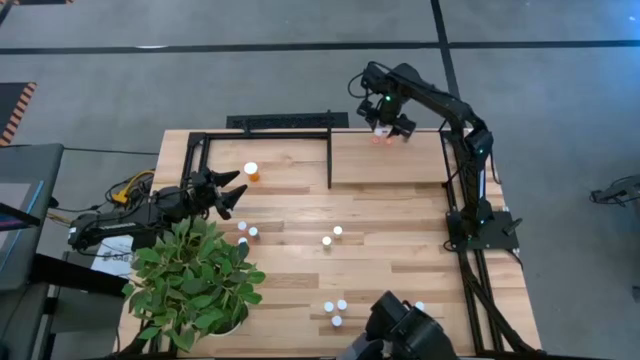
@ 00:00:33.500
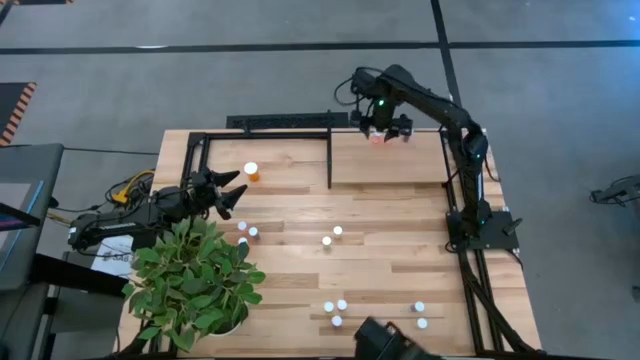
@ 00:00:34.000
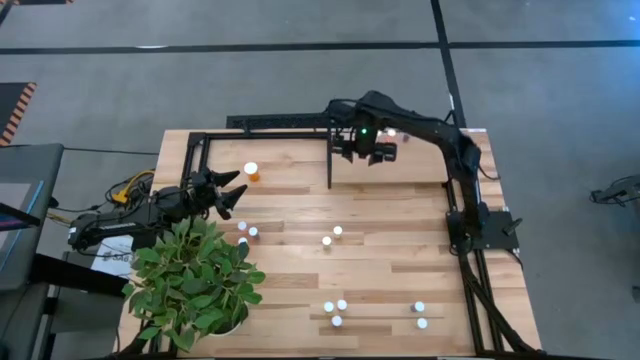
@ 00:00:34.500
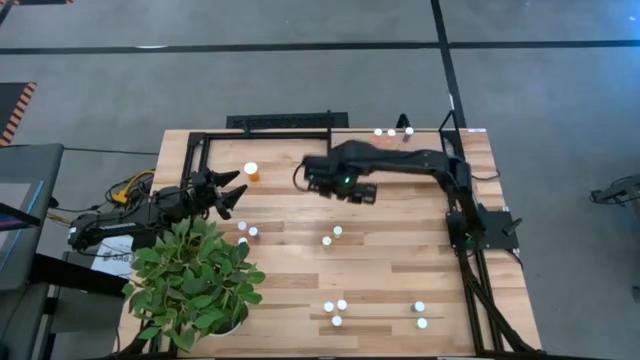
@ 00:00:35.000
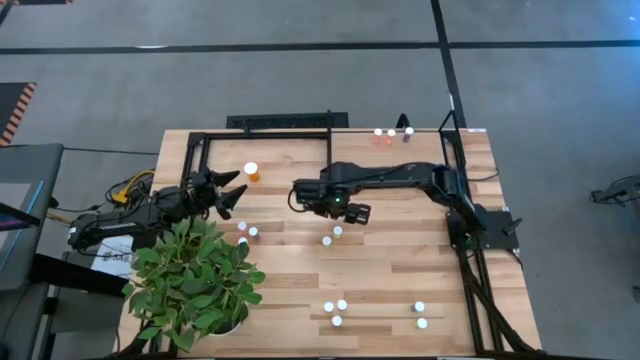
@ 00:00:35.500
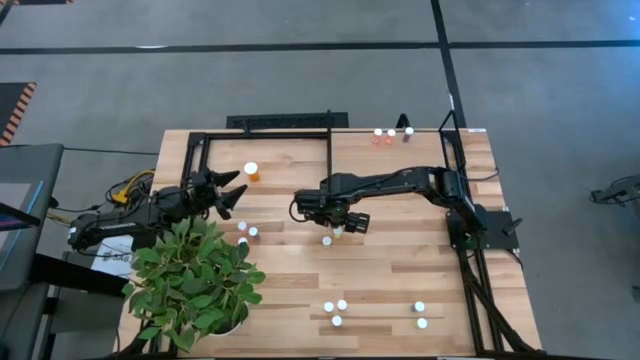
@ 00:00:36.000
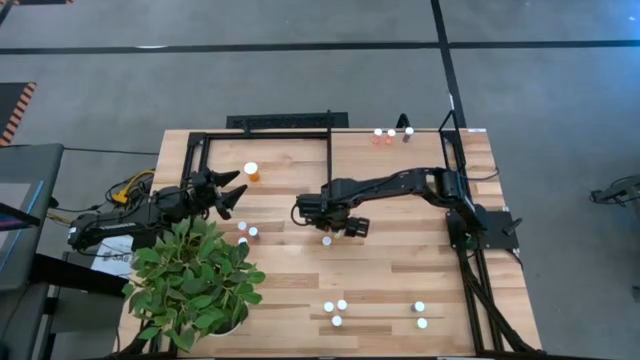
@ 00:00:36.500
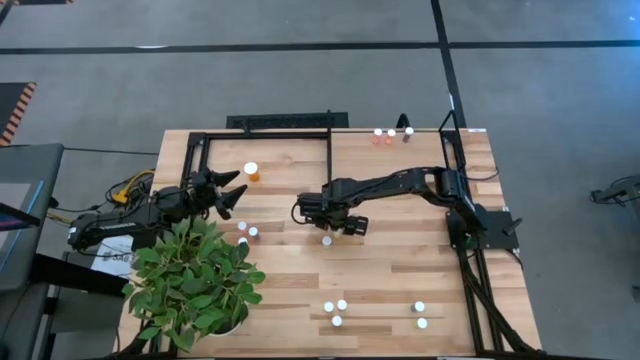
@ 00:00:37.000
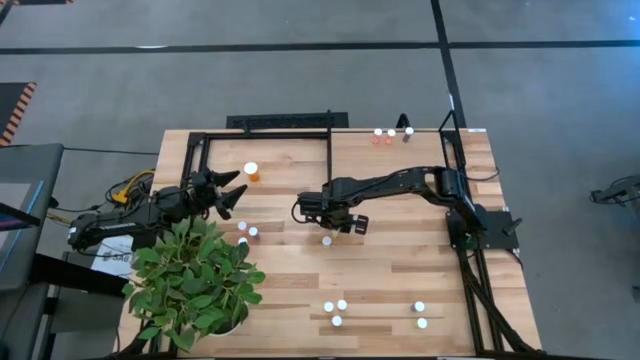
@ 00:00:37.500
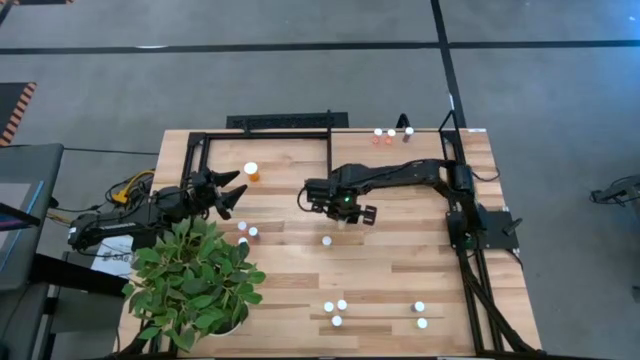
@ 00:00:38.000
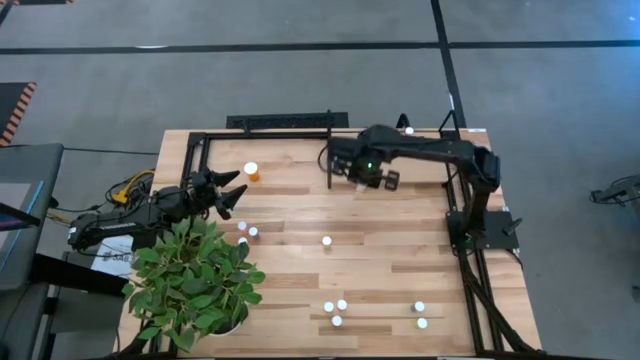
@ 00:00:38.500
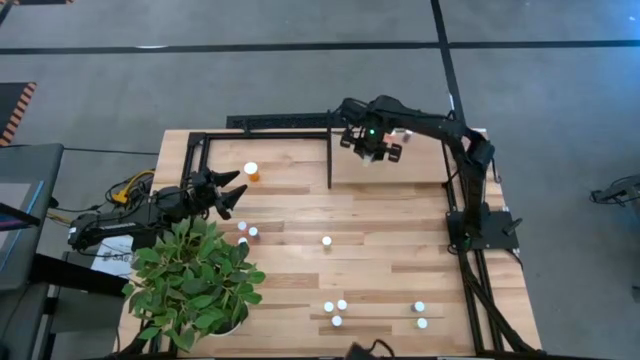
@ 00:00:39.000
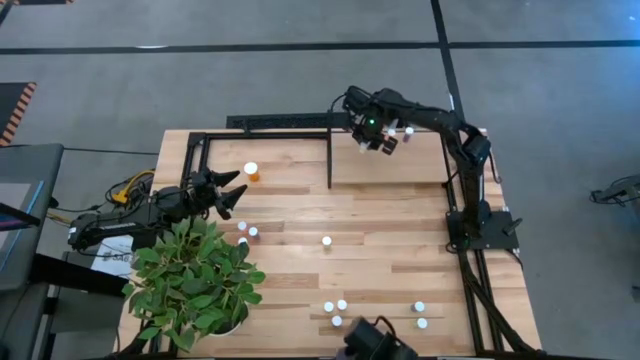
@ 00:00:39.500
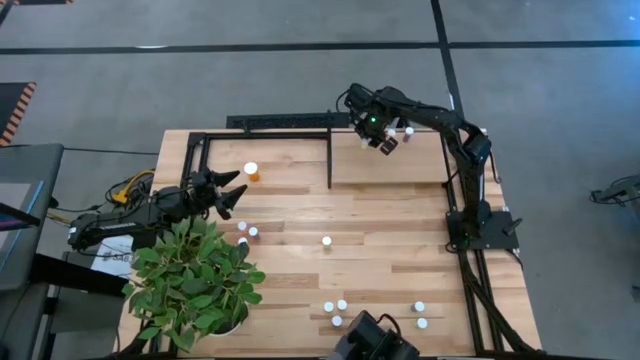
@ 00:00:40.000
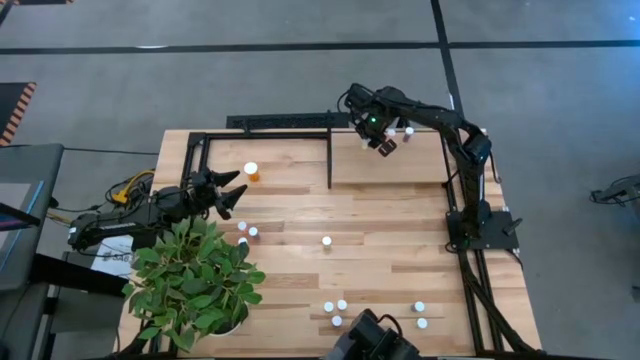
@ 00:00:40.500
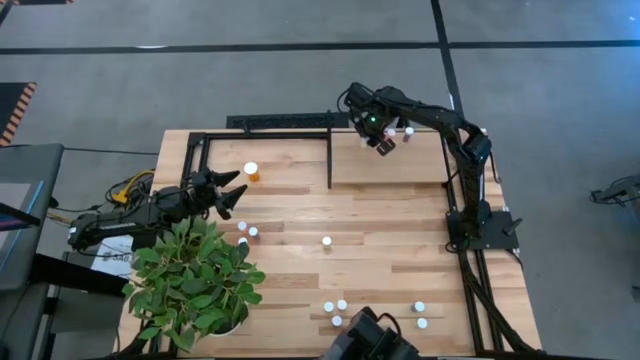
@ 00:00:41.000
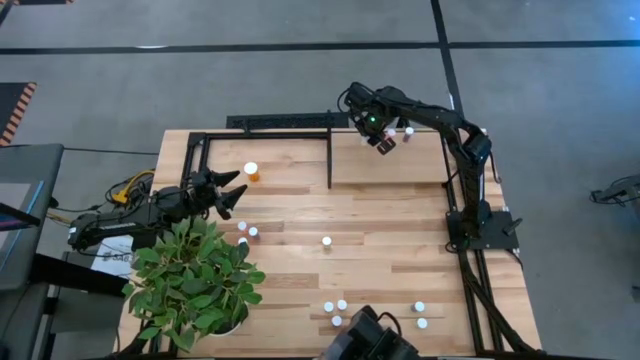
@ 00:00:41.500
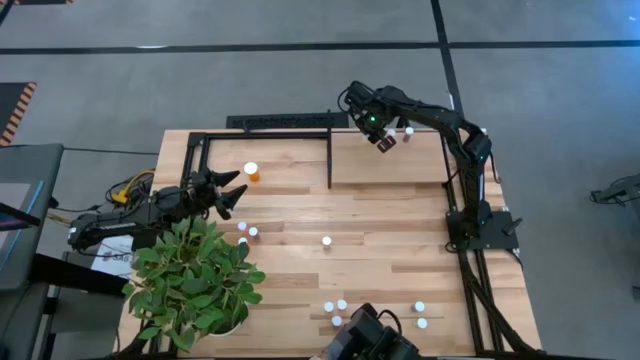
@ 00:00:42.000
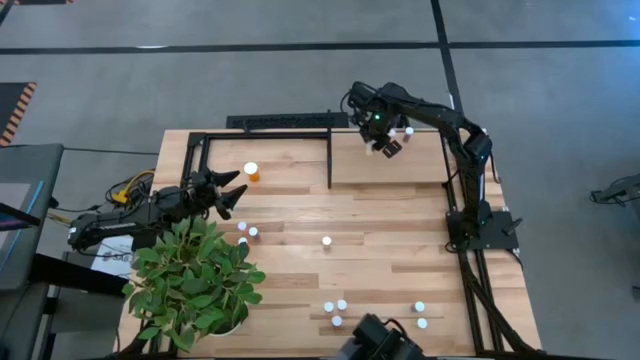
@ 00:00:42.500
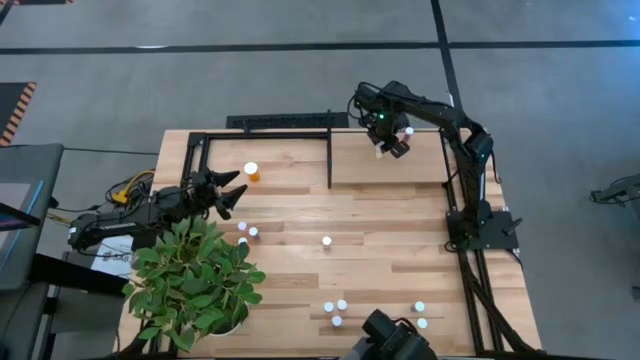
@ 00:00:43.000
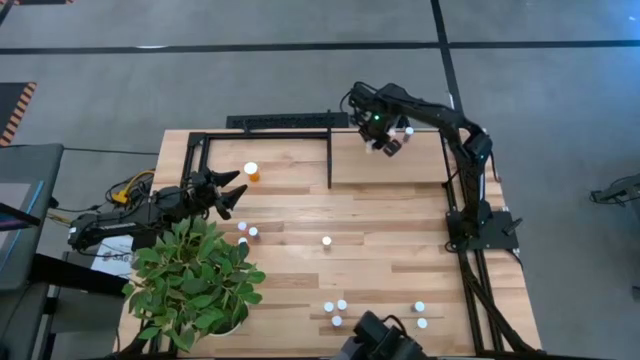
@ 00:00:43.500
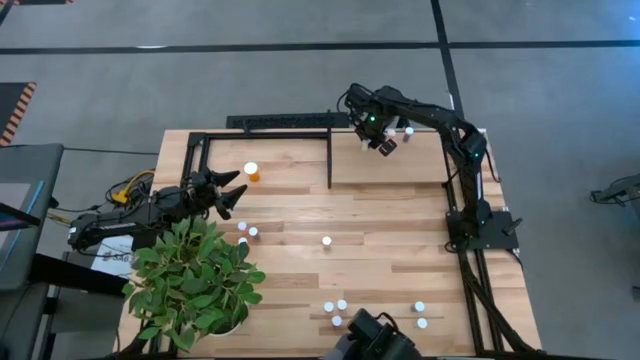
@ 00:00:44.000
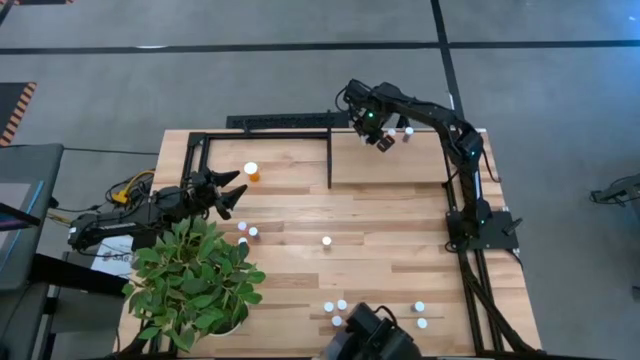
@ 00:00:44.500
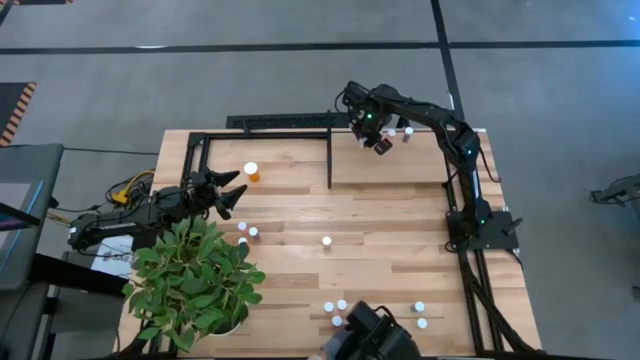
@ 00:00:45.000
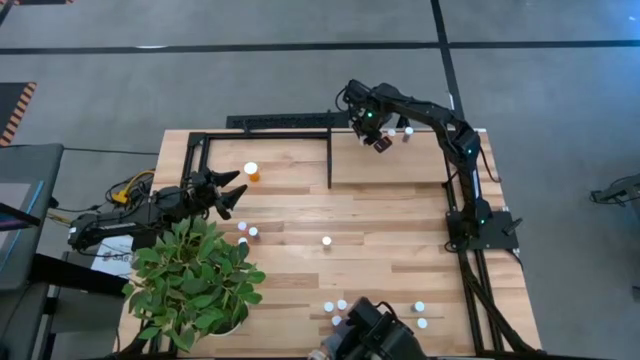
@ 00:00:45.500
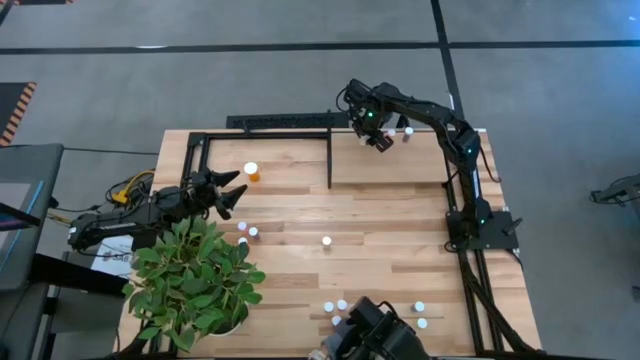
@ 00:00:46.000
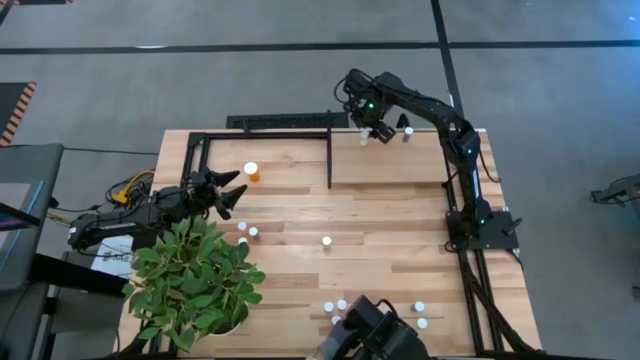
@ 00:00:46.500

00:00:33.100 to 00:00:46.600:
Task: Pick and place medicine bottles onto shelf by color
Put the yellow pill bottle on the shelf

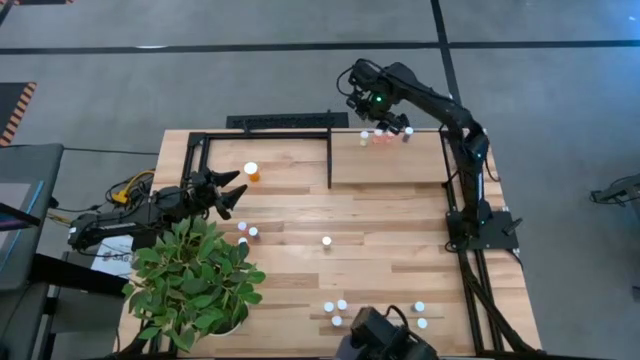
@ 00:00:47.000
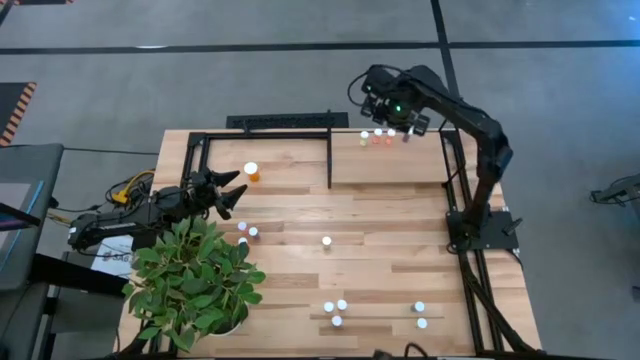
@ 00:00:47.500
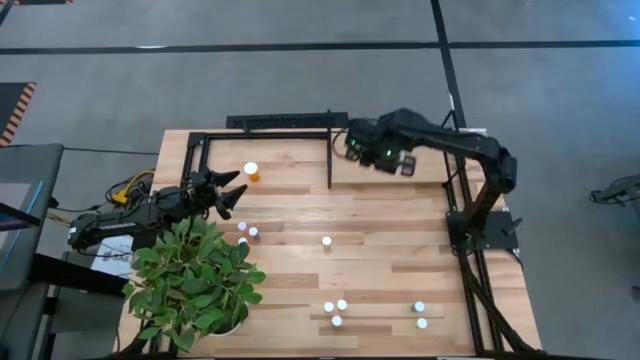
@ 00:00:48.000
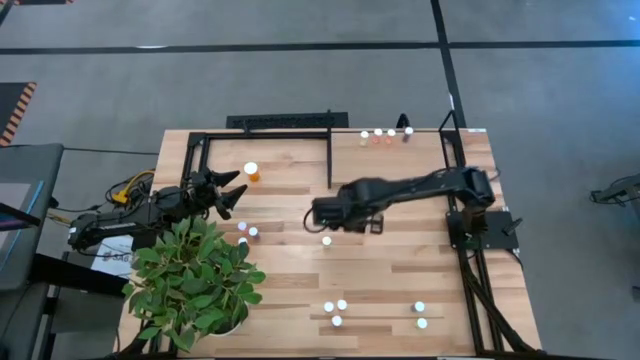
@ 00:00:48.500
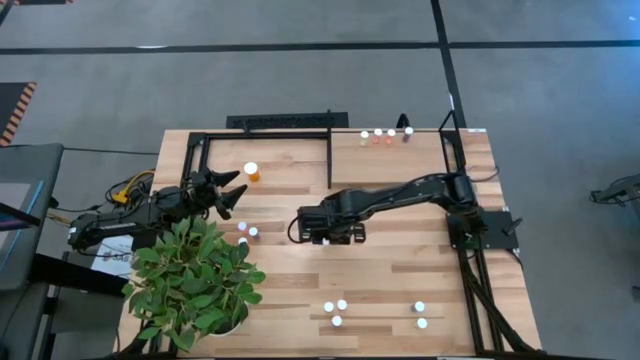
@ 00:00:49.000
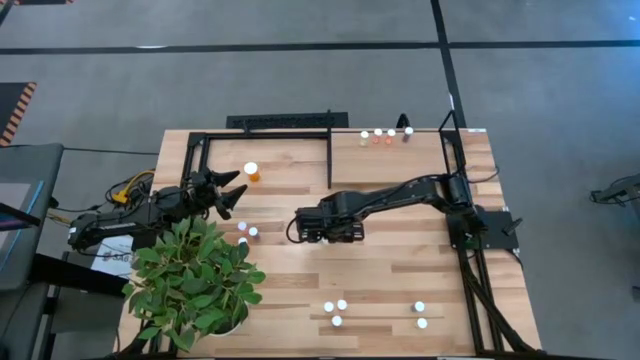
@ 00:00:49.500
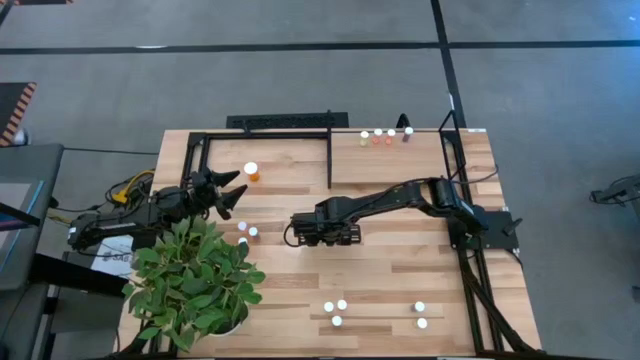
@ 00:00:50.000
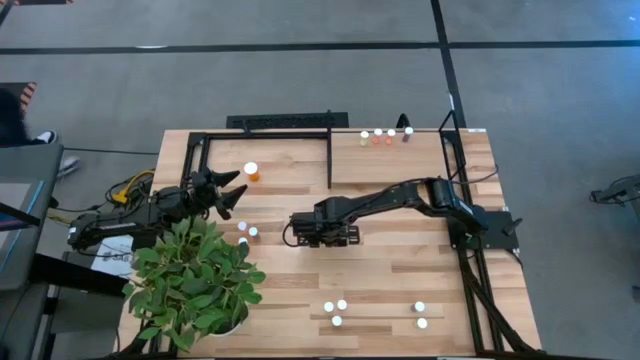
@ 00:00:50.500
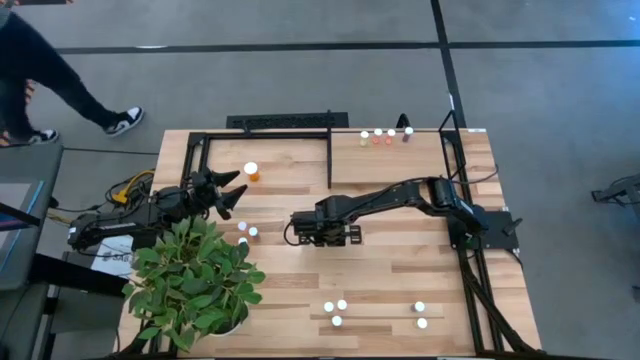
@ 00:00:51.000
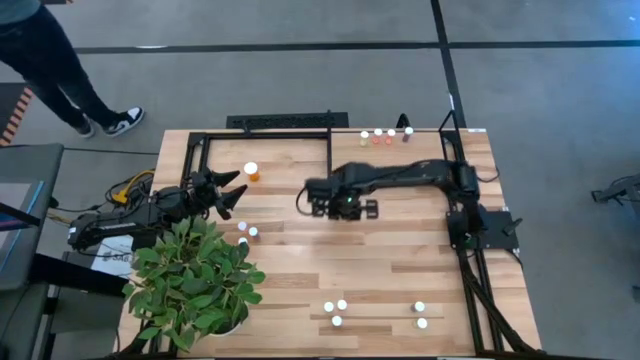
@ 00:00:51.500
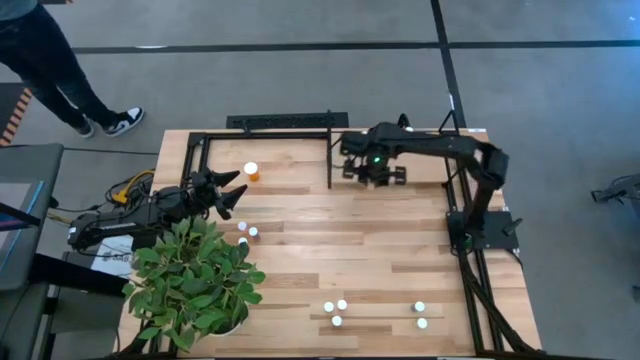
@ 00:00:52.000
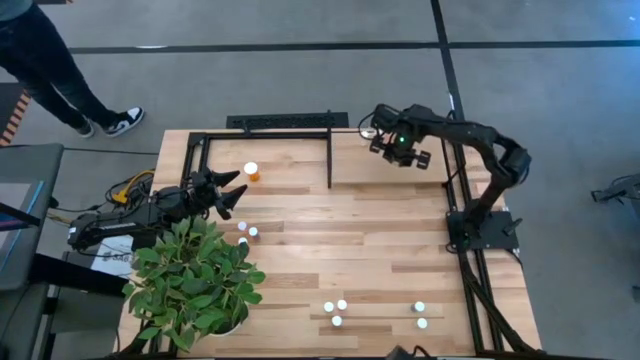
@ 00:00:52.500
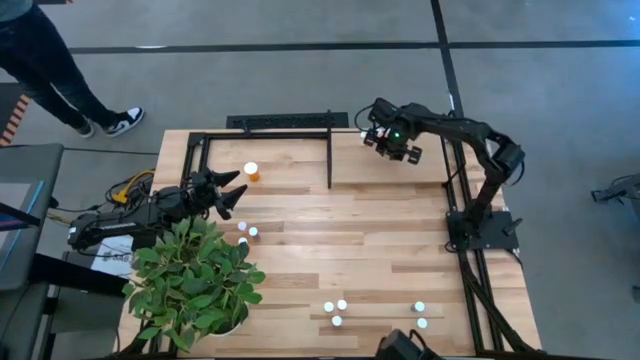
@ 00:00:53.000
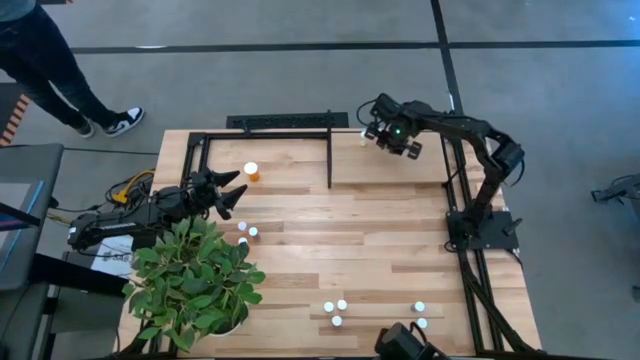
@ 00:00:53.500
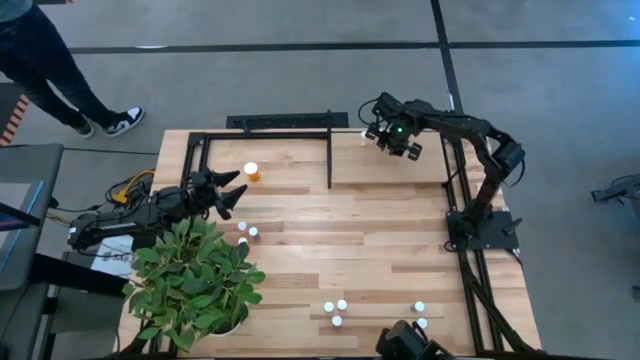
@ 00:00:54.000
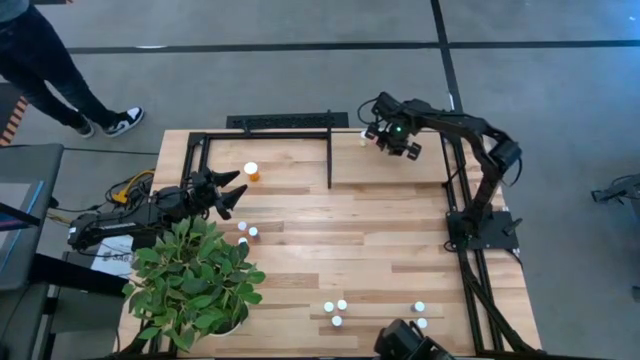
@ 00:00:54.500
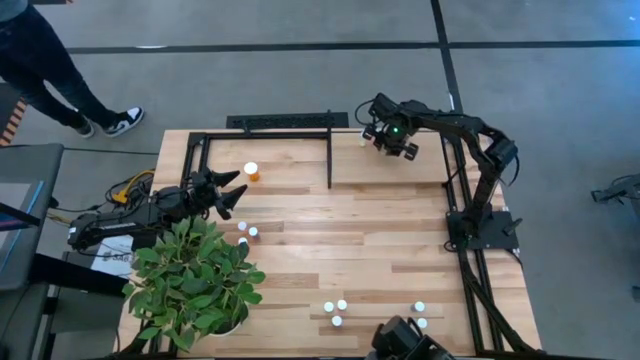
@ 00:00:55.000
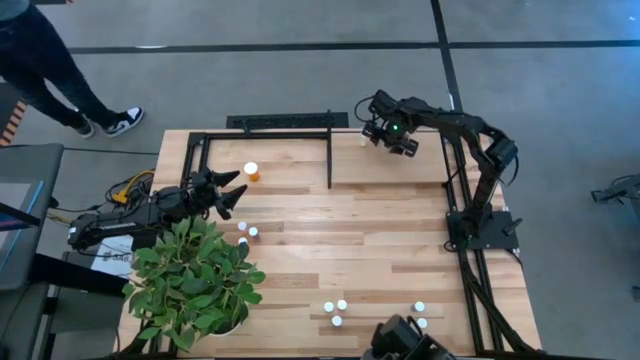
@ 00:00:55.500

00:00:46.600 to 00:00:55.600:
Put the yellow pill bottle on the shelf
